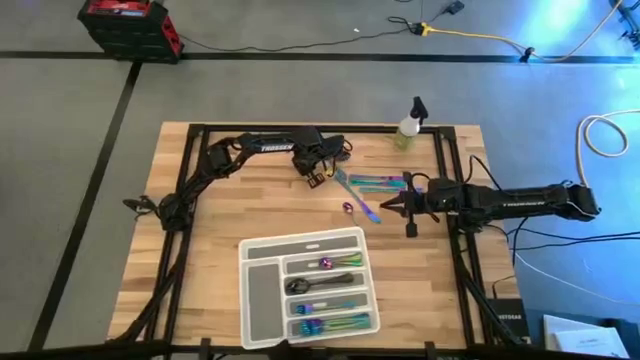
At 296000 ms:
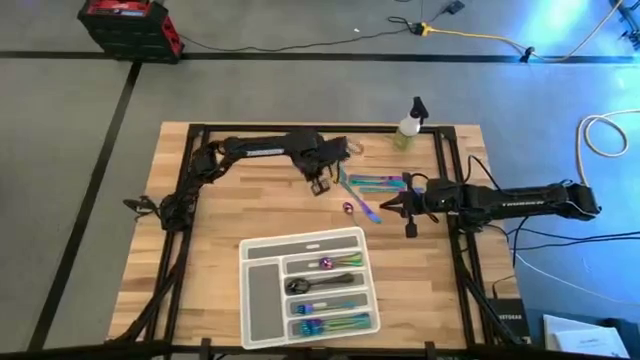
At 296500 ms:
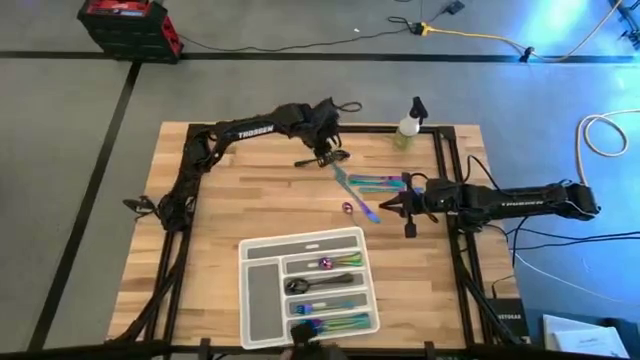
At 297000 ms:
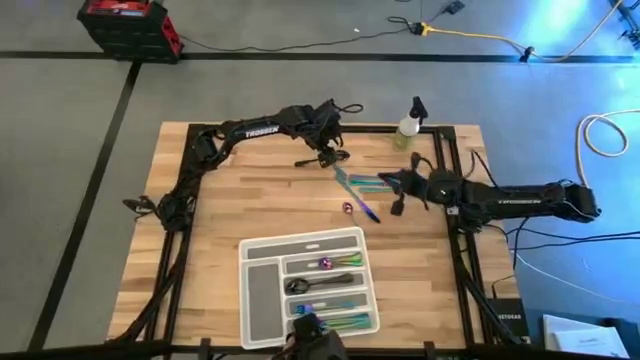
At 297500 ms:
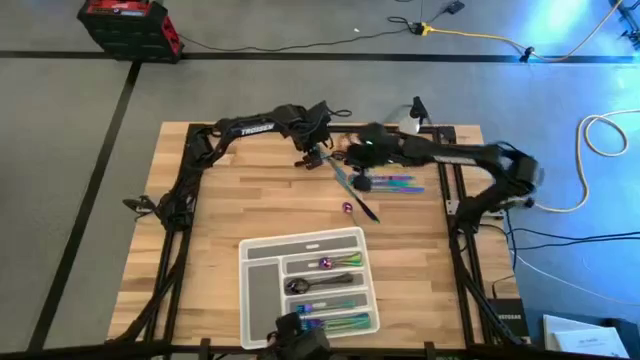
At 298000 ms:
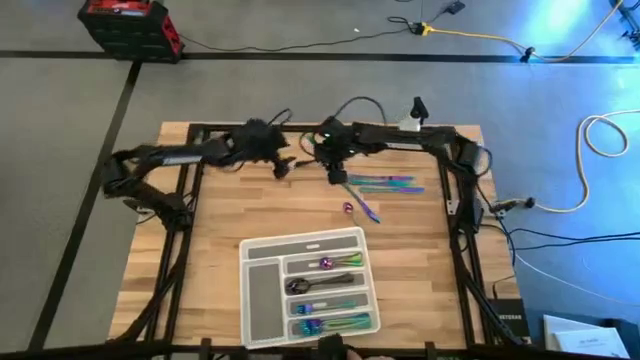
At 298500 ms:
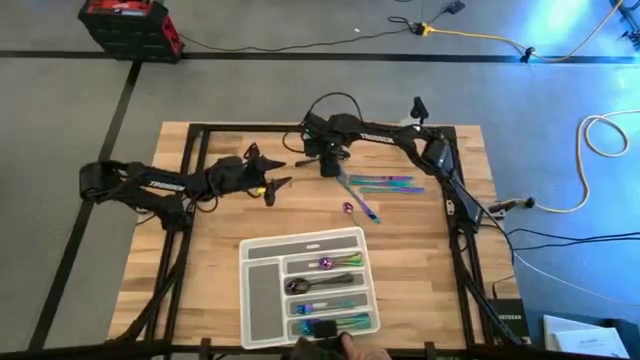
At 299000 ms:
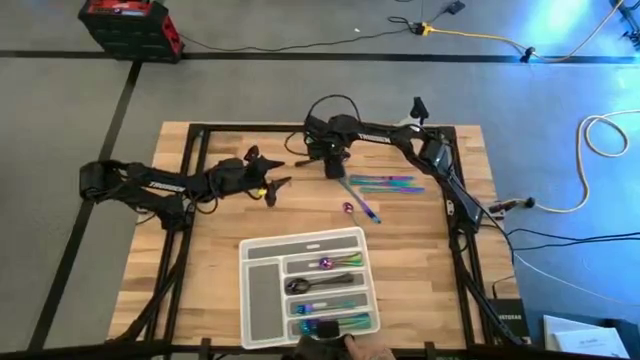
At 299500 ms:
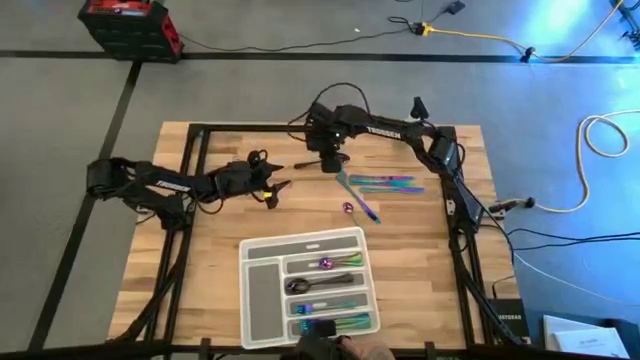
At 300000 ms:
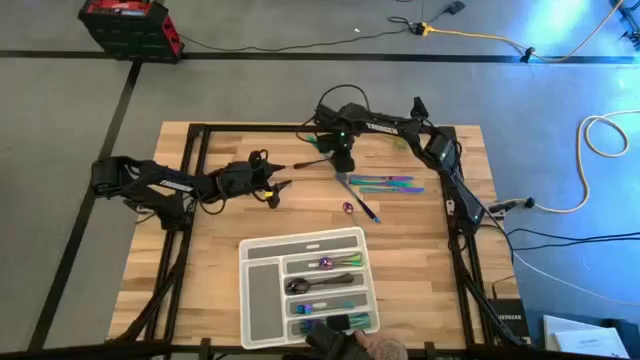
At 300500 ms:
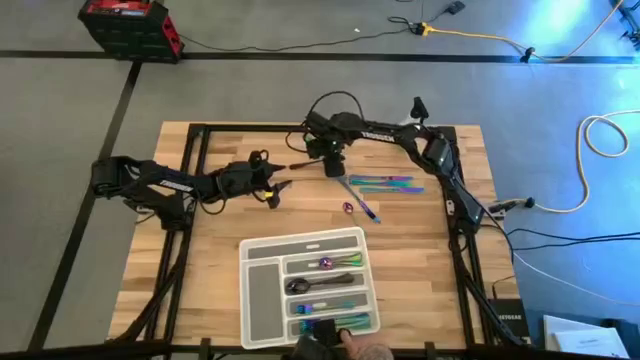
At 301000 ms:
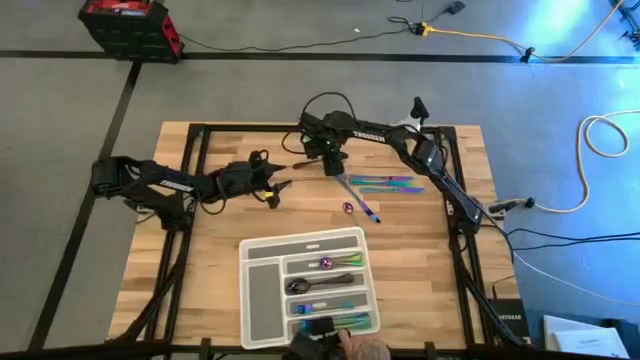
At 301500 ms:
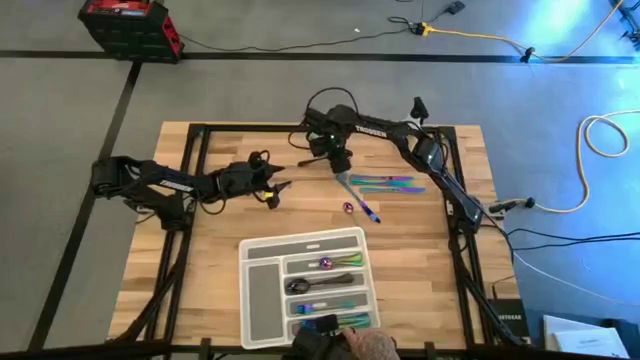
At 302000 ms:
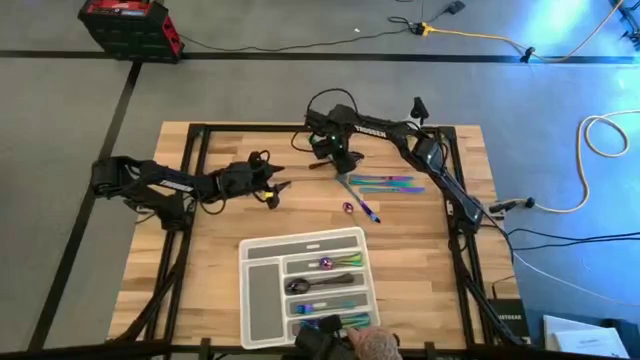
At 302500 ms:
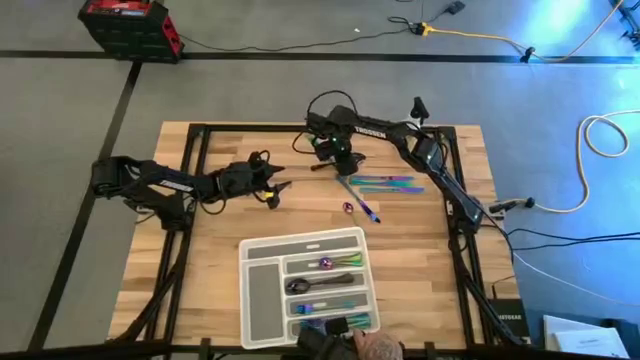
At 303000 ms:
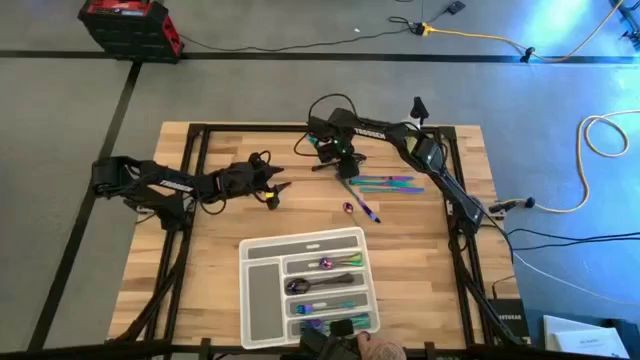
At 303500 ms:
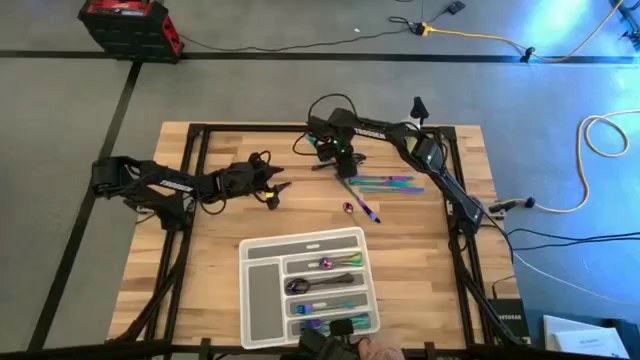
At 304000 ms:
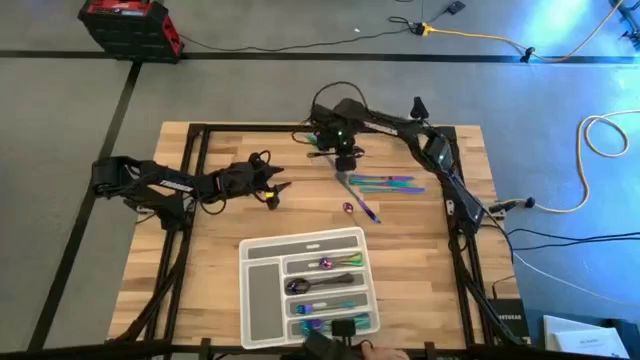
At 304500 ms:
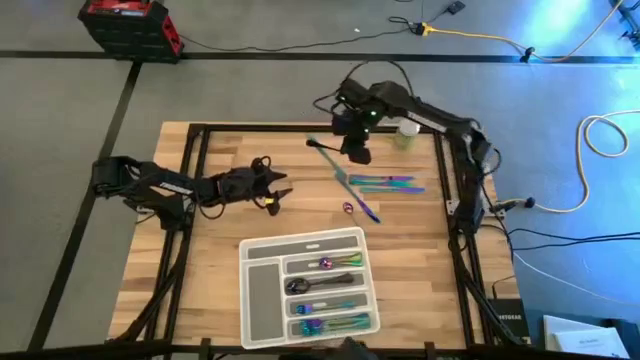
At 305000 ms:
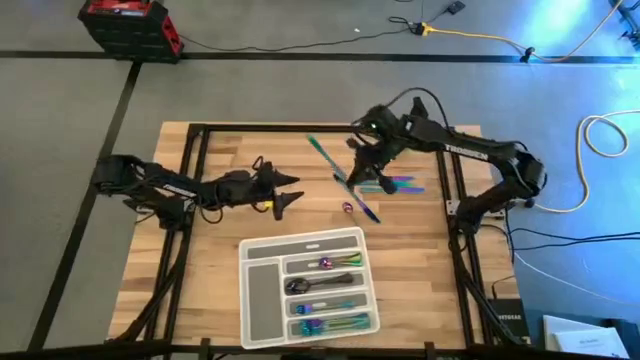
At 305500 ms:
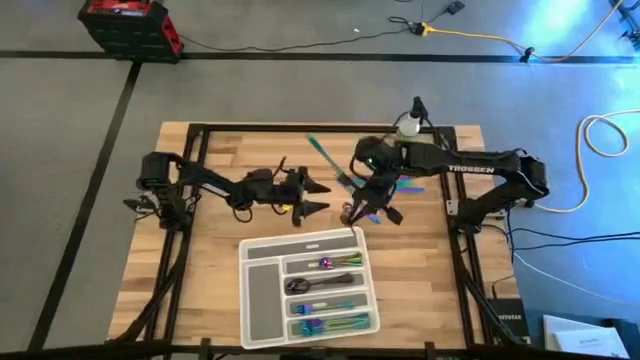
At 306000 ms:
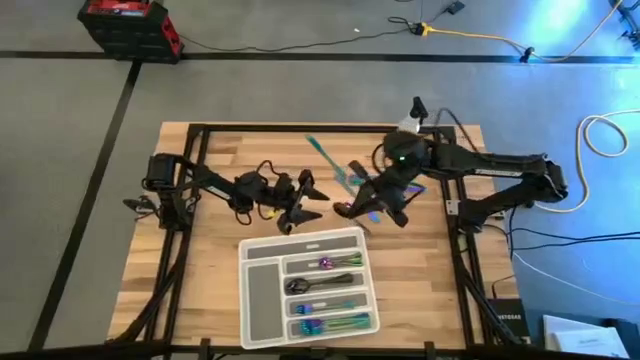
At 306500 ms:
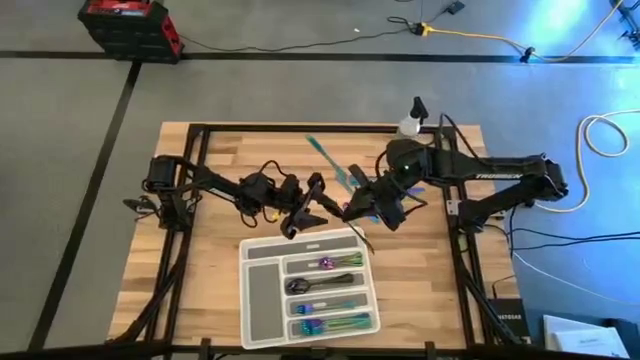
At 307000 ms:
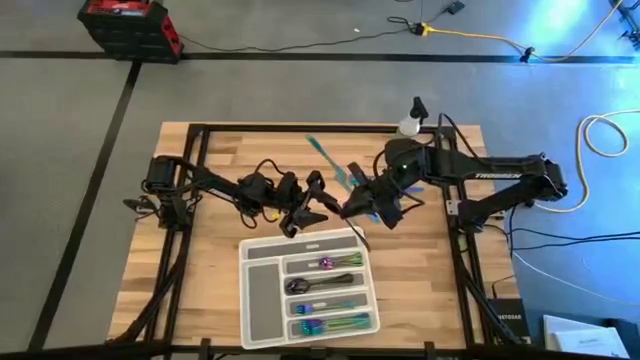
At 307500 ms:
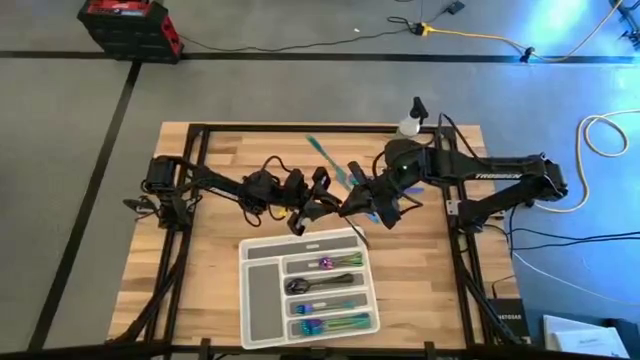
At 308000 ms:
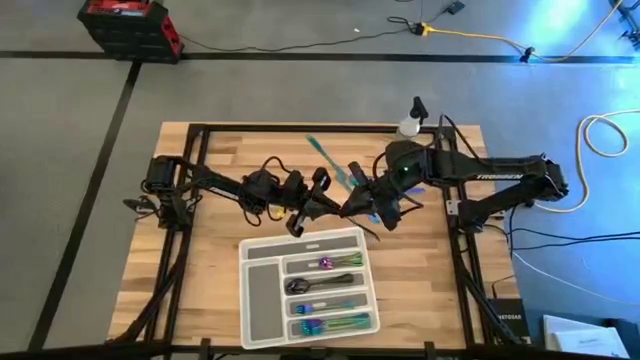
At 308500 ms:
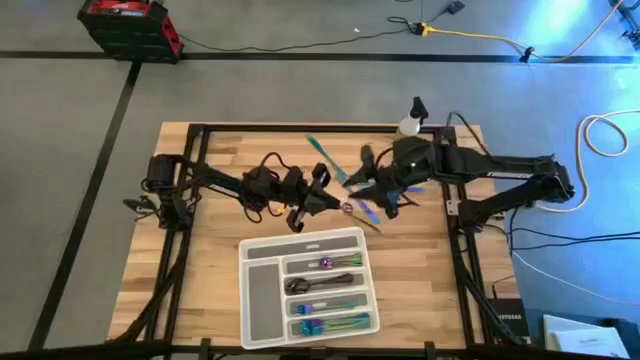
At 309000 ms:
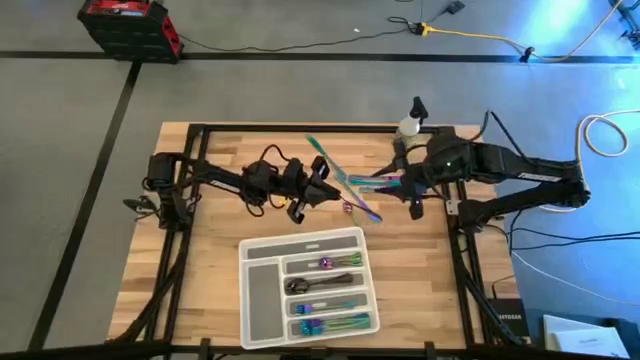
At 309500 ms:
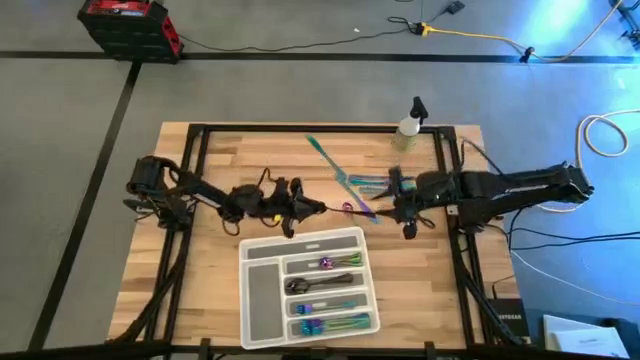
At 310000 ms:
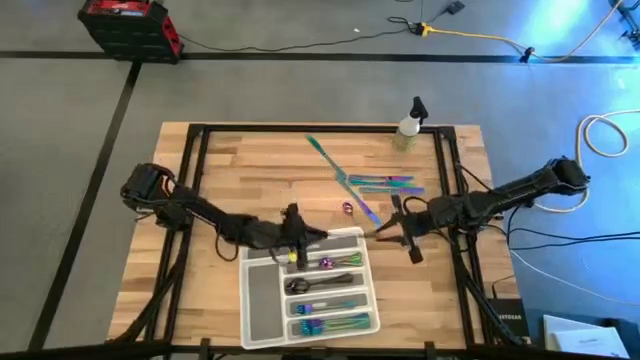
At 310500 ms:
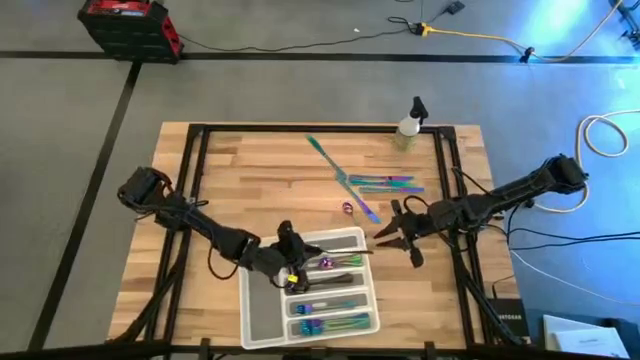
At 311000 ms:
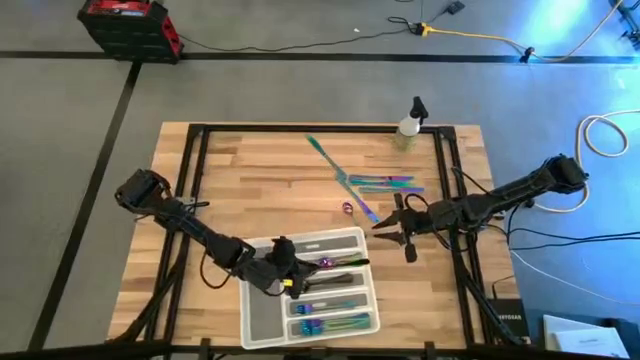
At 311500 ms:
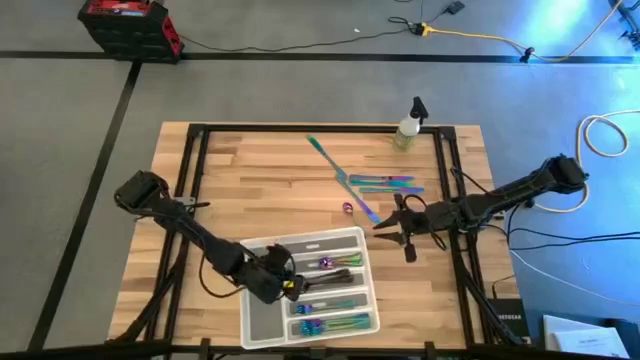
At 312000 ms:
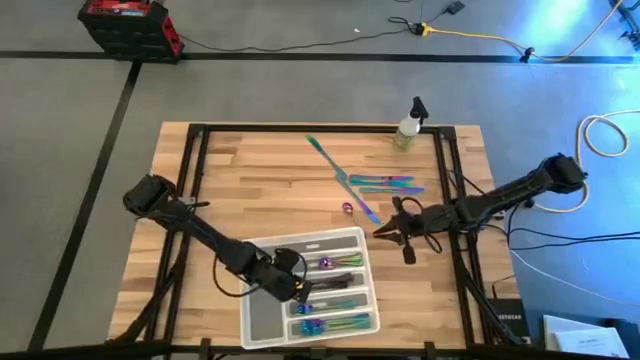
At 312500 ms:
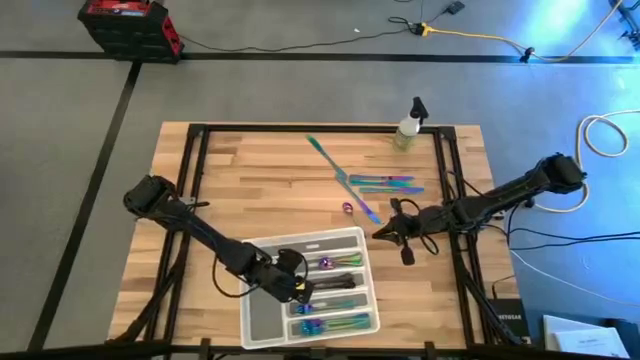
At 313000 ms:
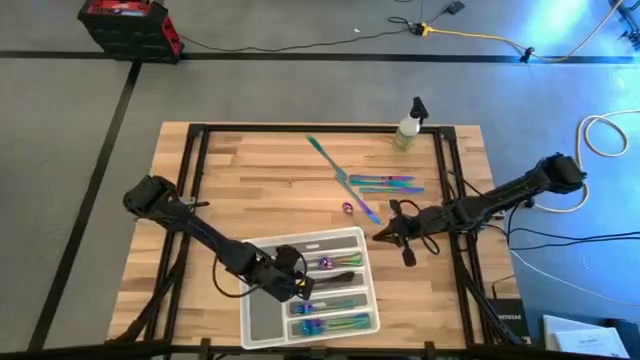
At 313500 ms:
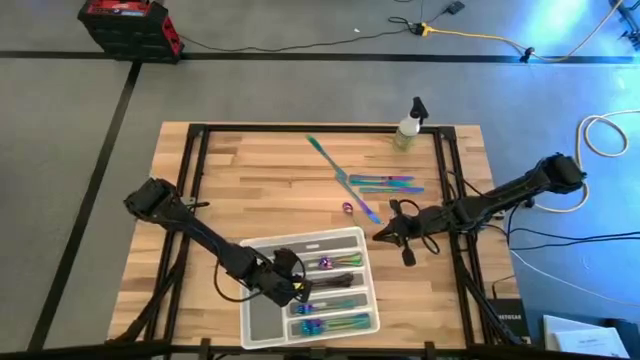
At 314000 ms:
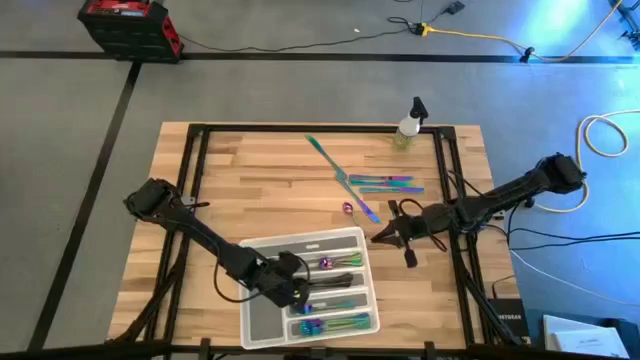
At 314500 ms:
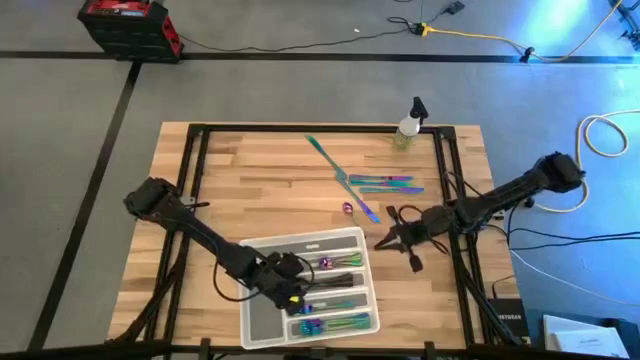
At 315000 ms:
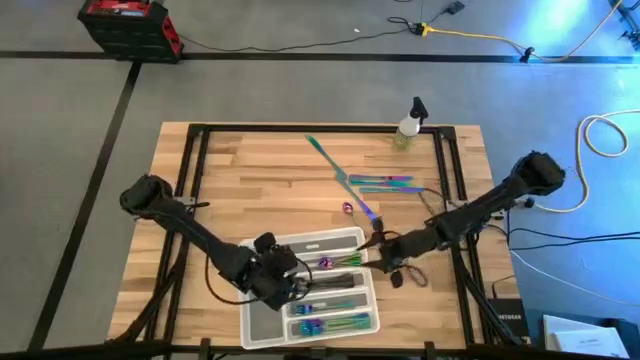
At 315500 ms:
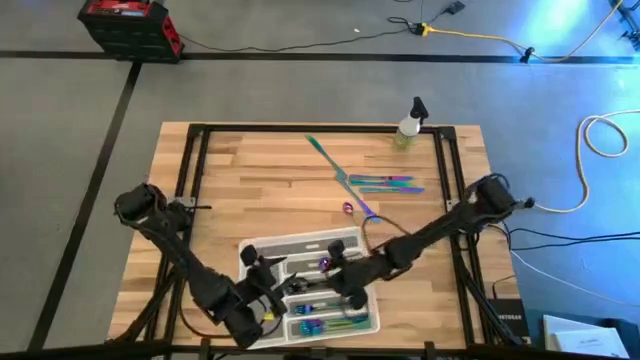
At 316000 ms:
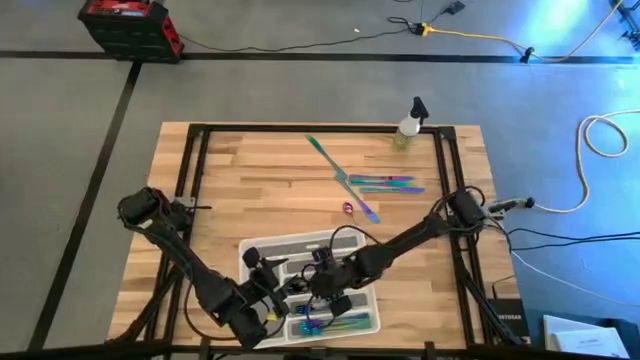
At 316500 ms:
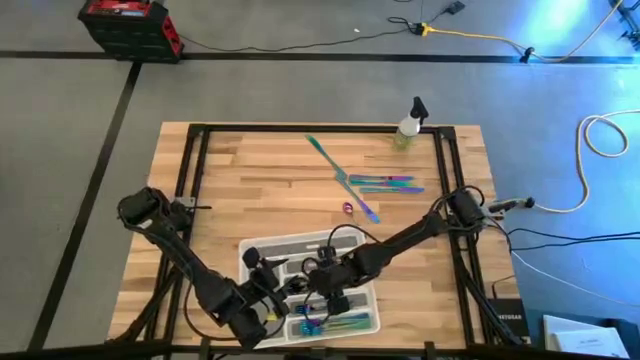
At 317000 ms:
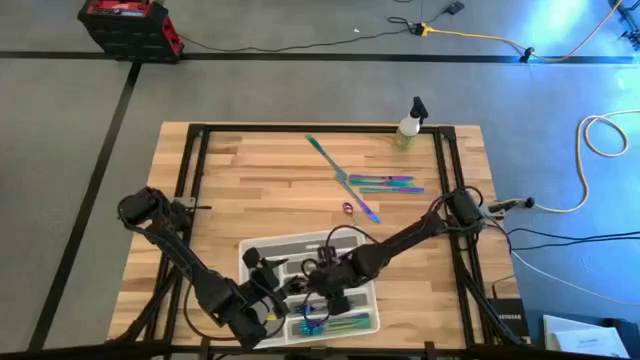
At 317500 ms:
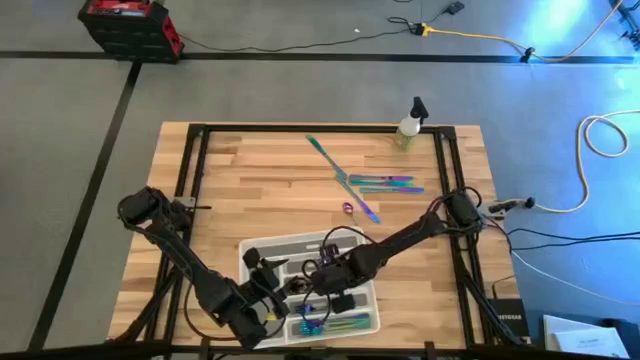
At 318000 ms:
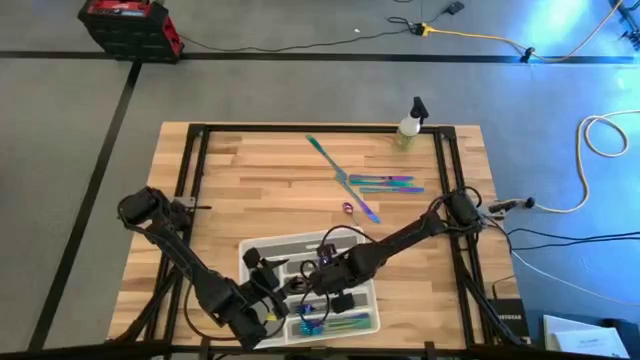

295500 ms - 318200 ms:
Task: Sort silverware
Put the black spoon into the white silverware tray
